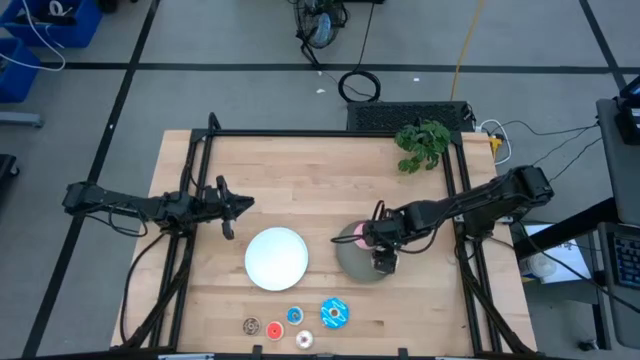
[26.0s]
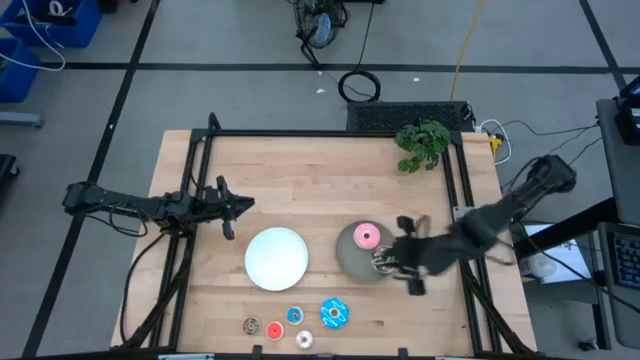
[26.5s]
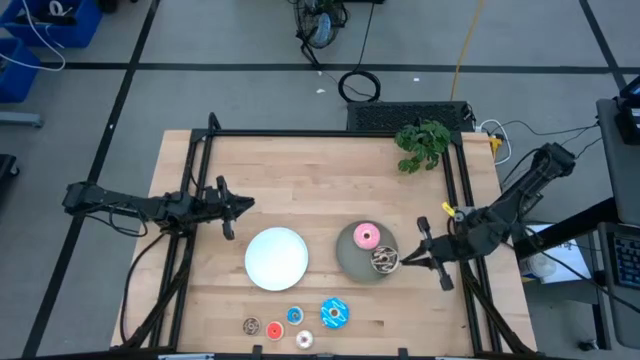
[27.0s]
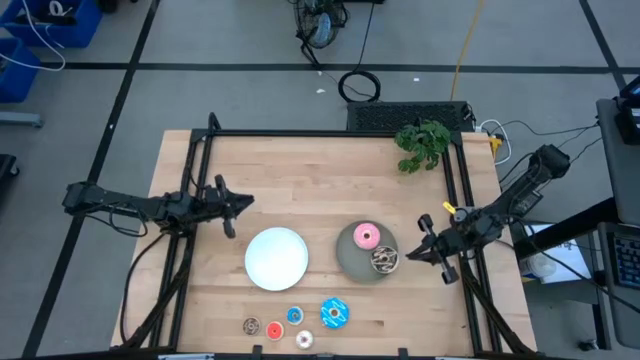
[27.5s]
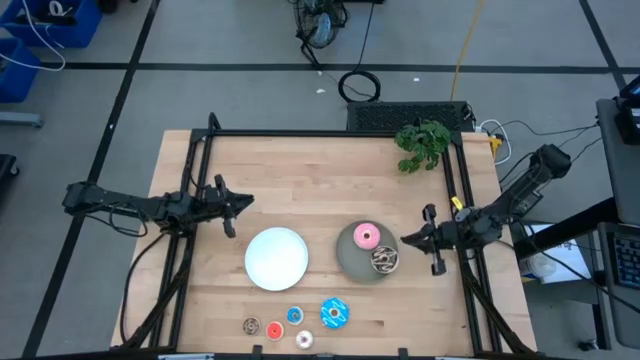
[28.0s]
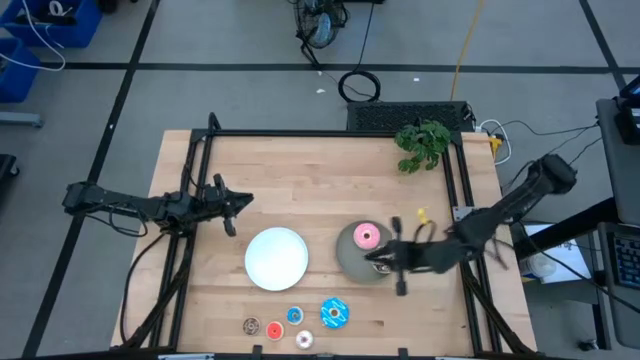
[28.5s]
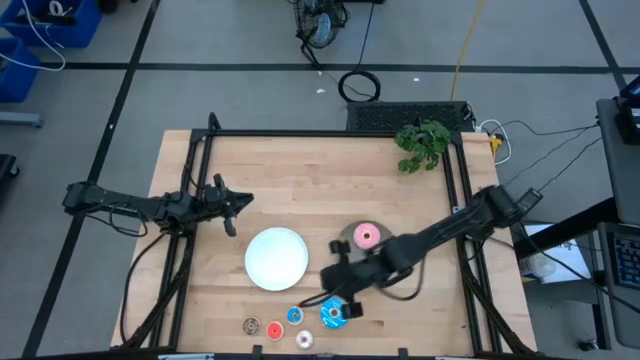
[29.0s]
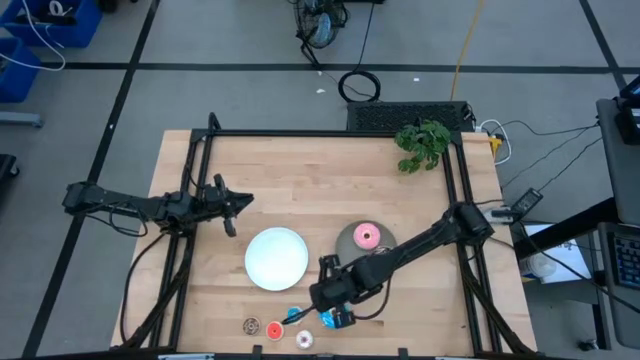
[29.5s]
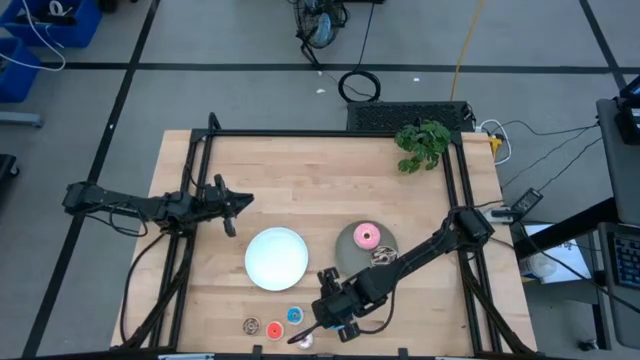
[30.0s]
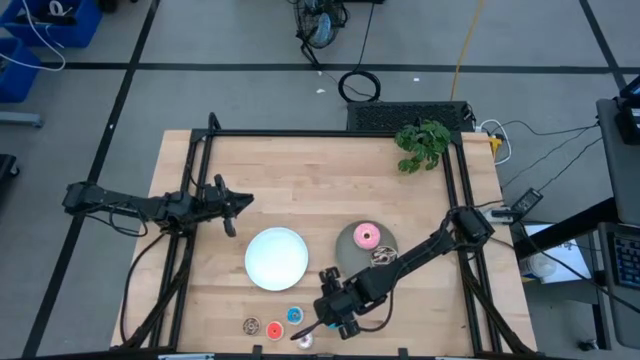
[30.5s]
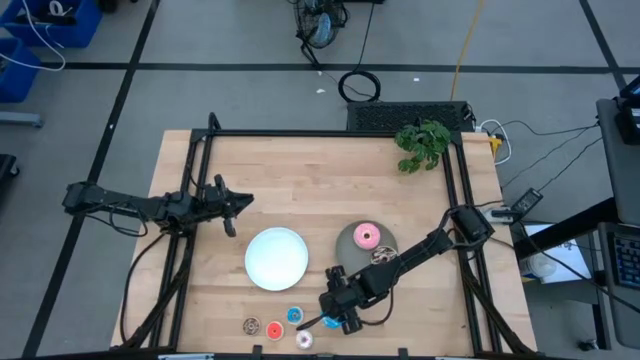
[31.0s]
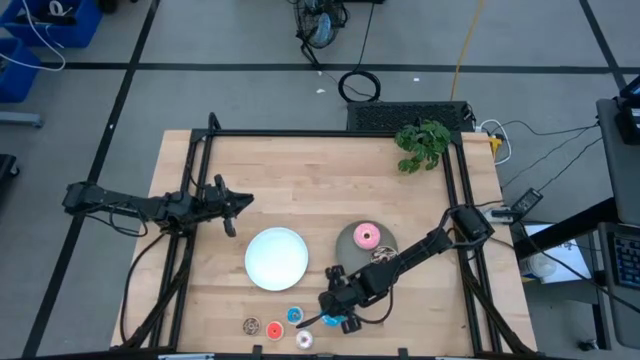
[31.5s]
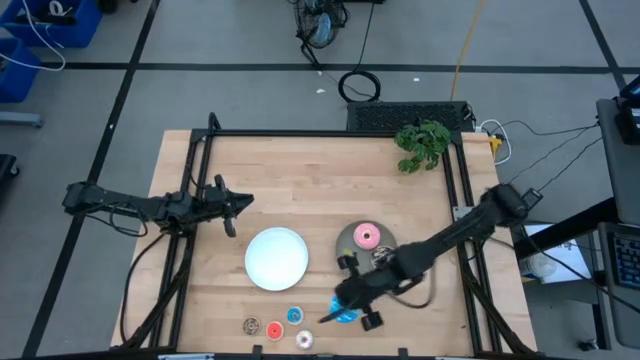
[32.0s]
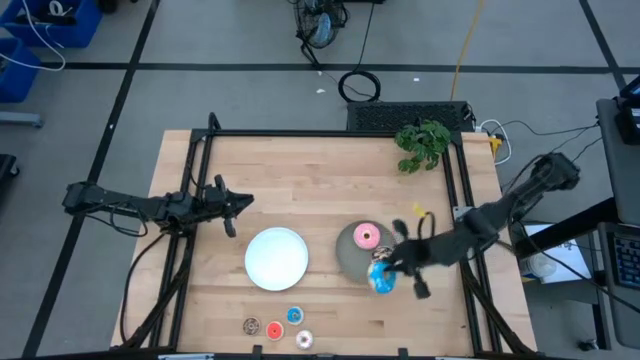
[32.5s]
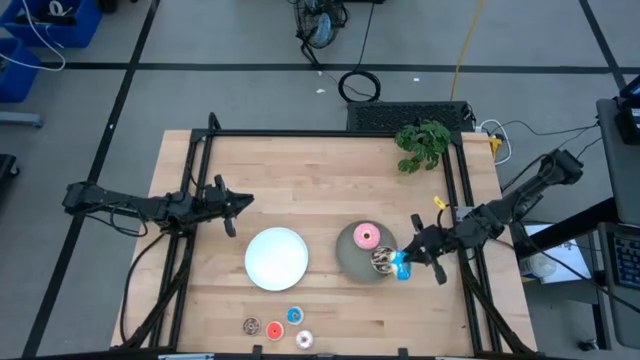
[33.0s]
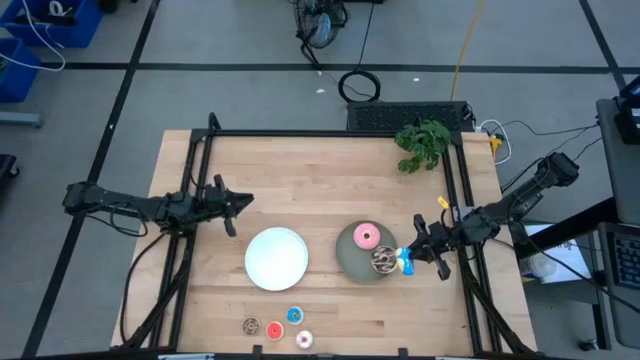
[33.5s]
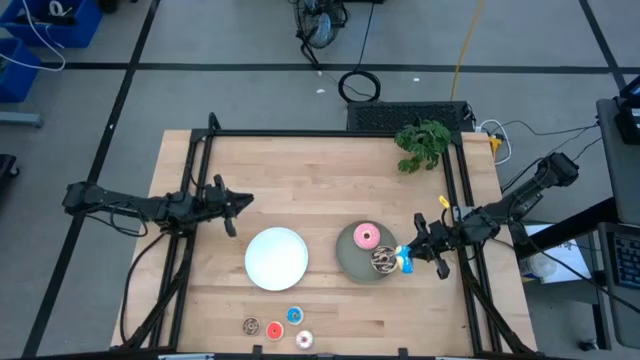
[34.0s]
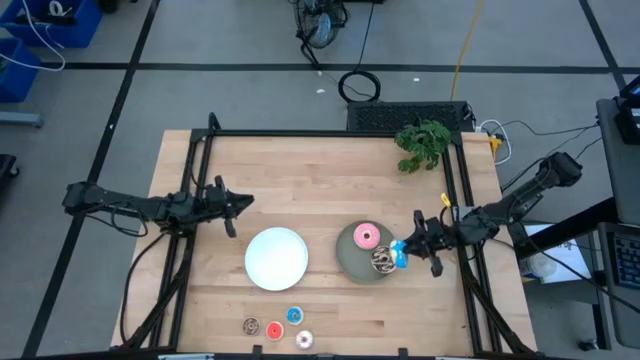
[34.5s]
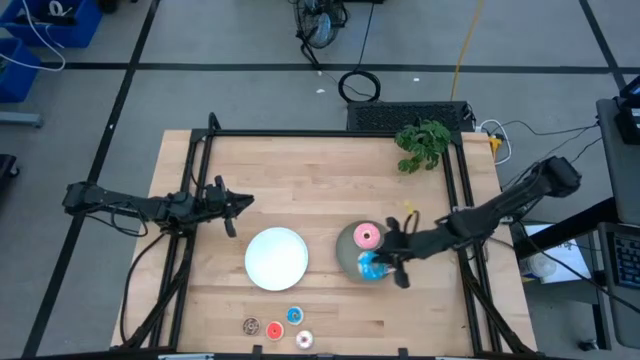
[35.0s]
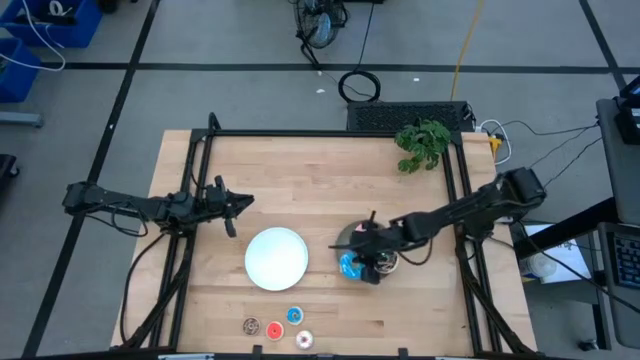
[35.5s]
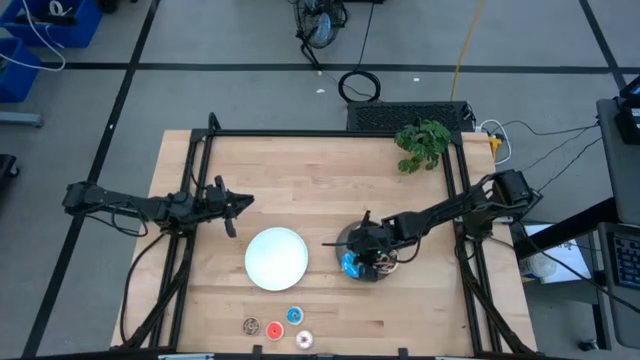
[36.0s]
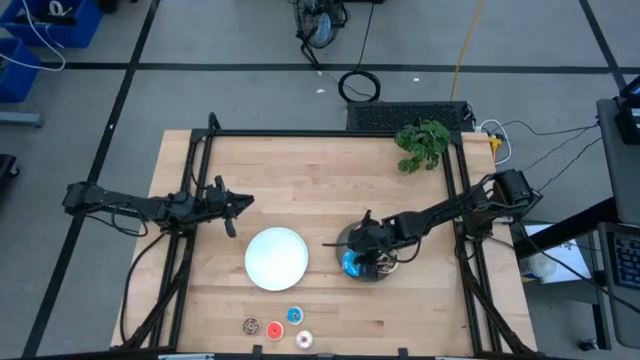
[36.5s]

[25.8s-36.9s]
Task: Pick & Place donuts
Put the big blue donut on the gray plate

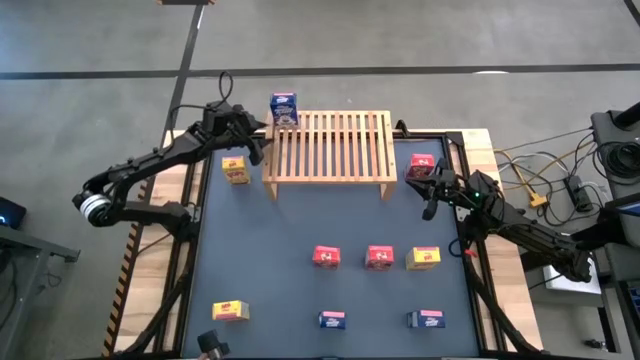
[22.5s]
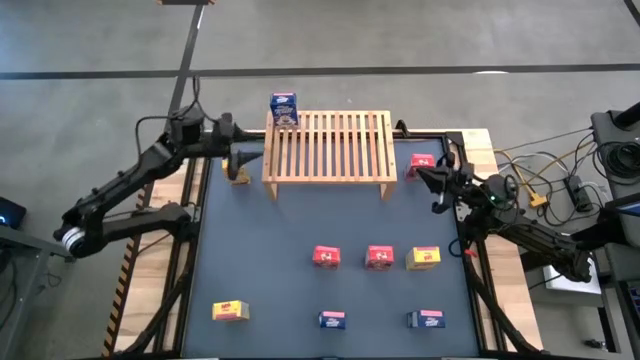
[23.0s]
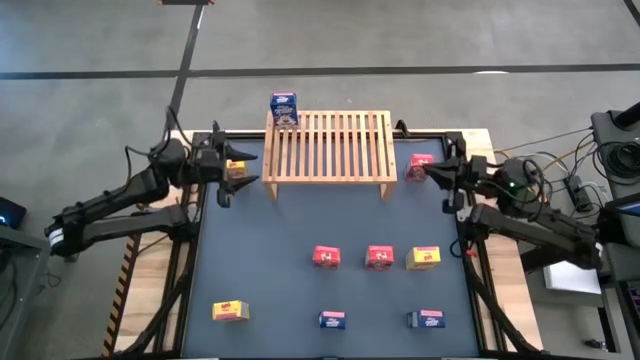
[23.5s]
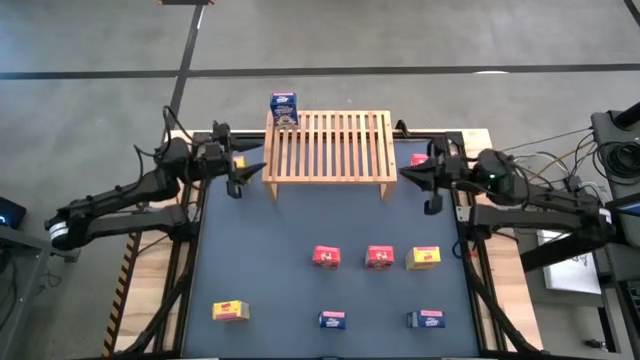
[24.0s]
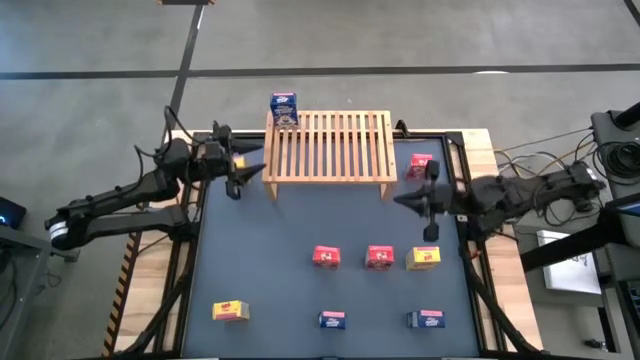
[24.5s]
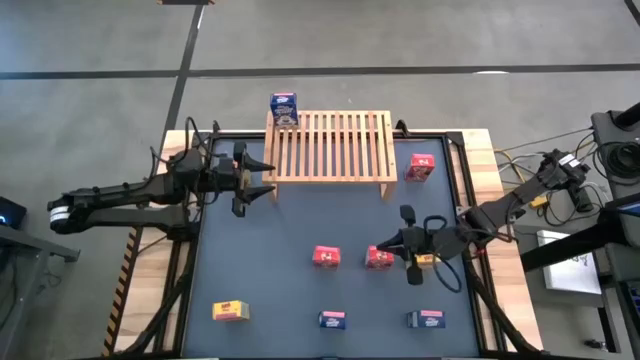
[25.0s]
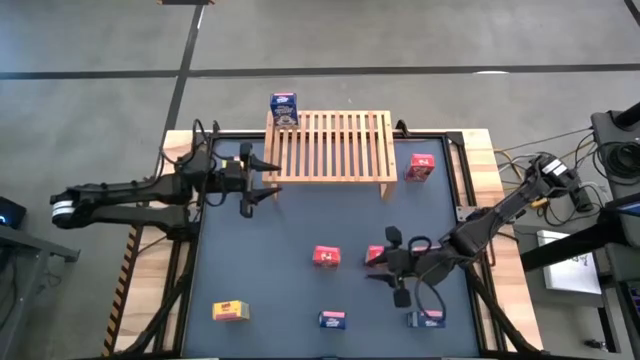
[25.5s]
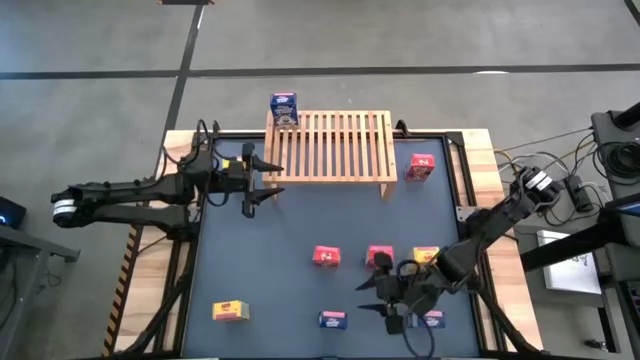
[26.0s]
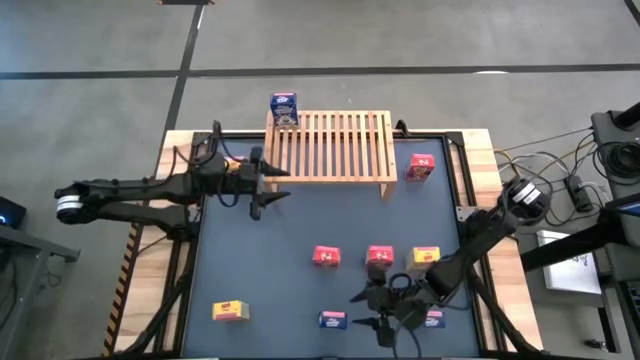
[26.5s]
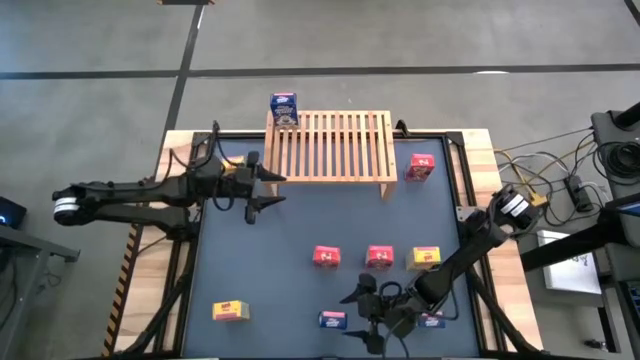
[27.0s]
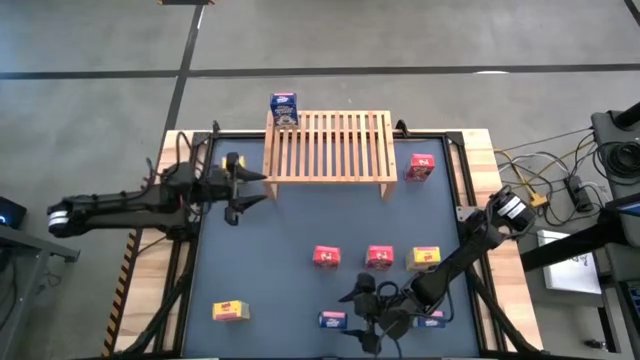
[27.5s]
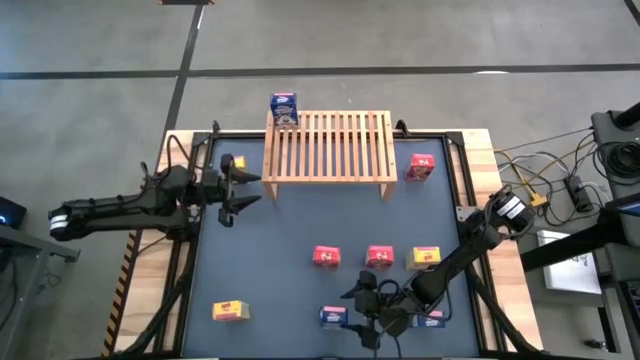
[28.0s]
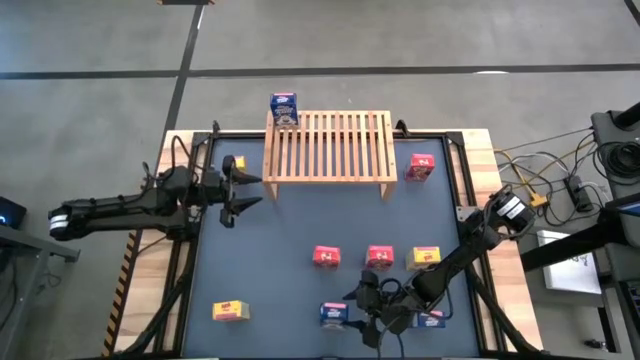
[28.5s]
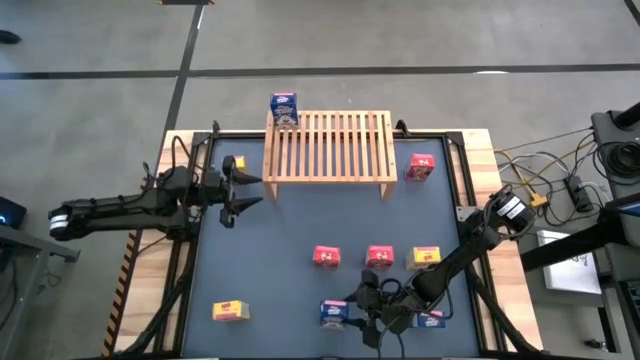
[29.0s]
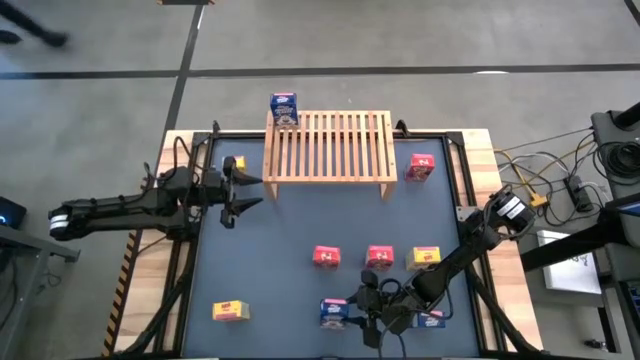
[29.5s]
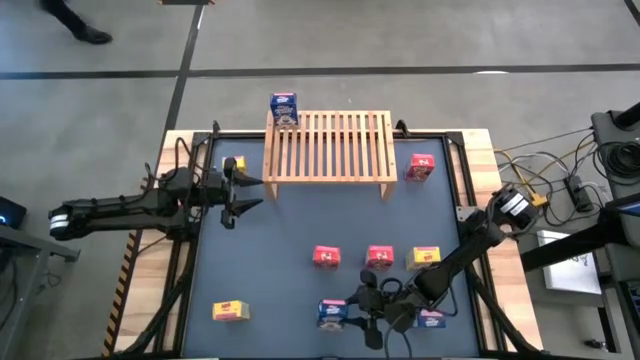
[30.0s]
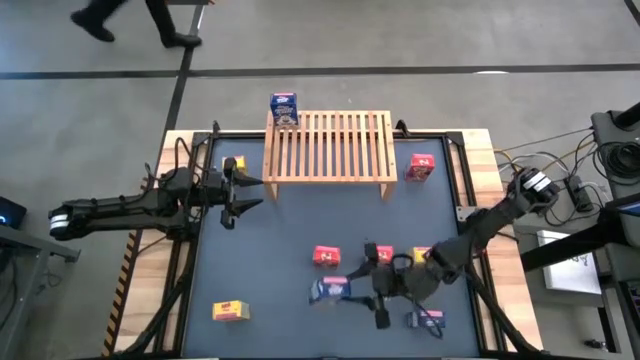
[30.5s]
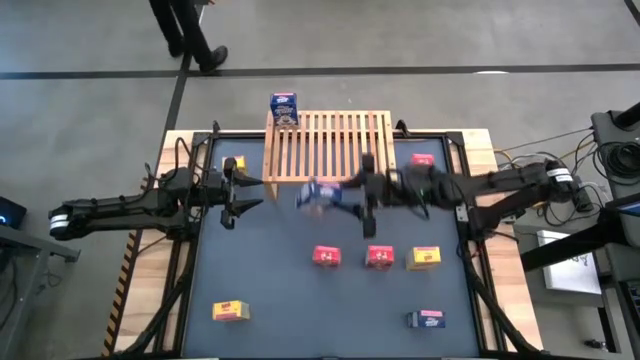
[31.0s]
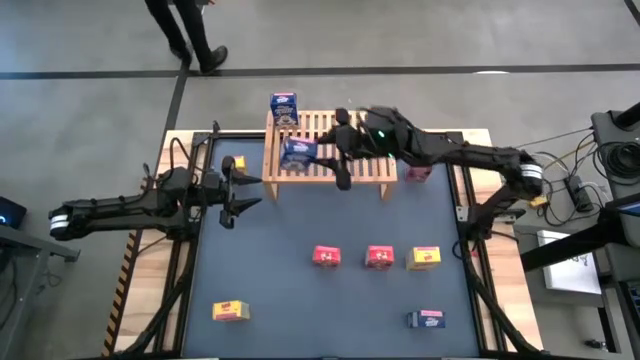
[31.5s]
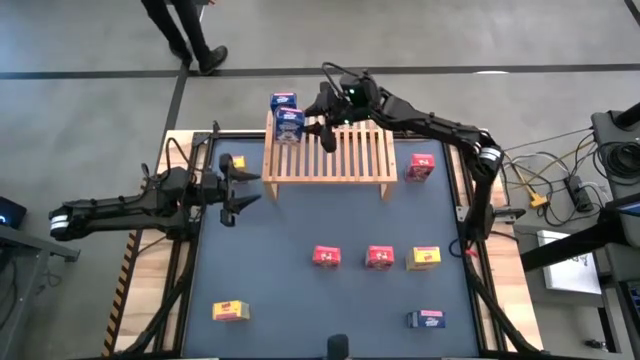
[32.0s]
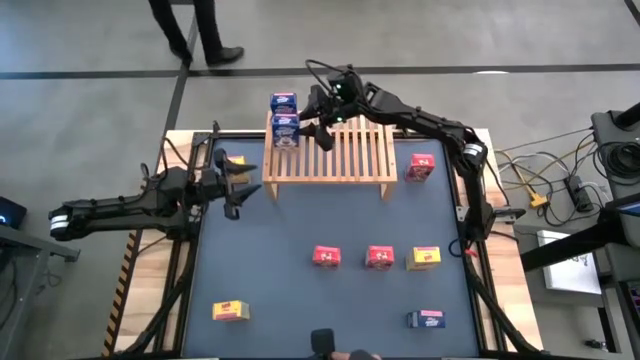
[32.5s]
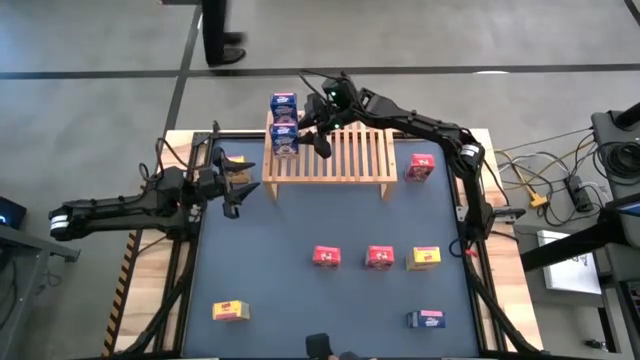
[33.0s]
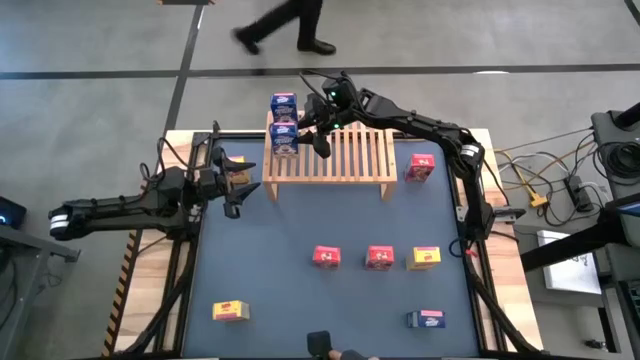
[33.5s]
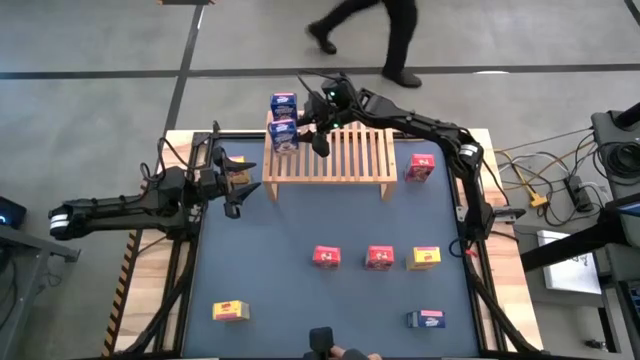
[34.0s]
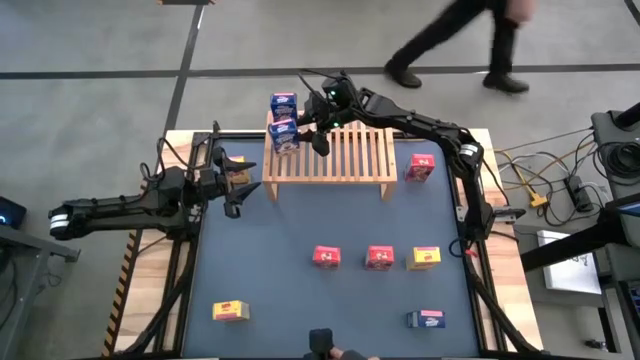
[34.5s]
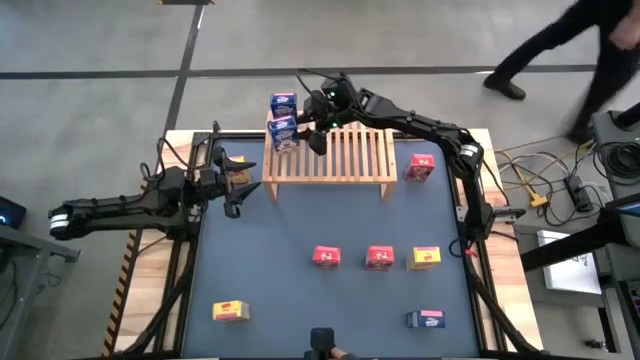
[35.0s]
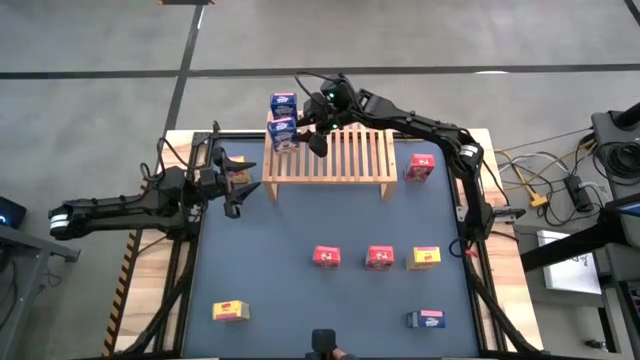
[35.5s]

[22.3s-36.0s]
Task: Stack cereal on shelf
Put the left blue cereal box on the shelf aligned with the other blue cereal box
